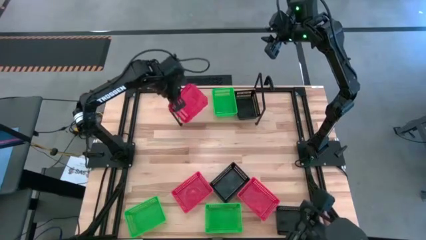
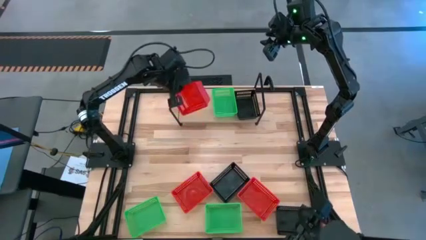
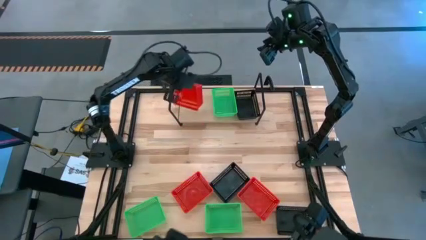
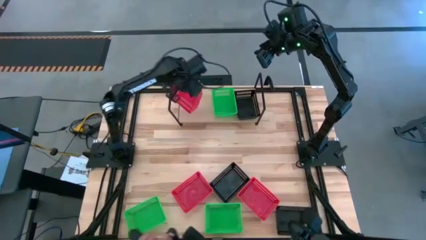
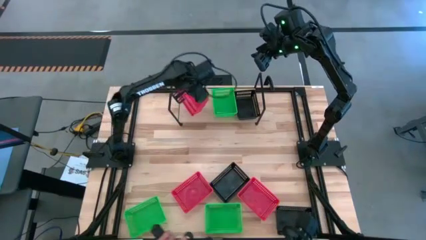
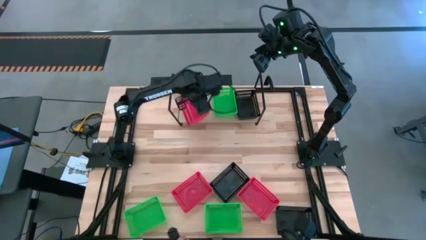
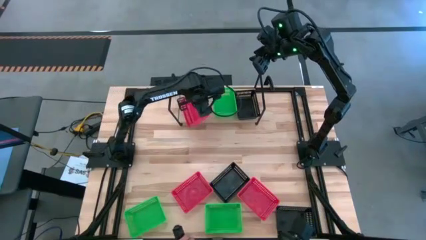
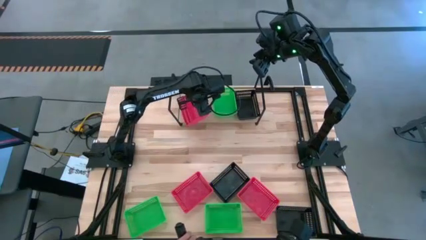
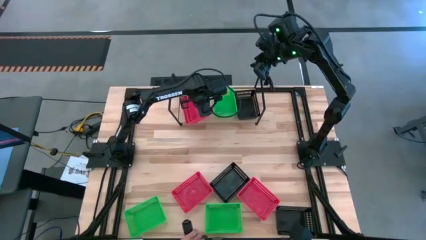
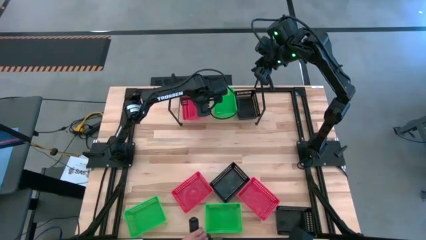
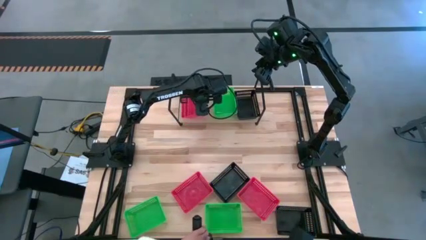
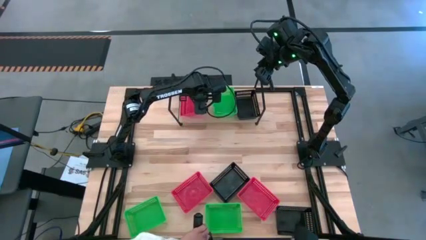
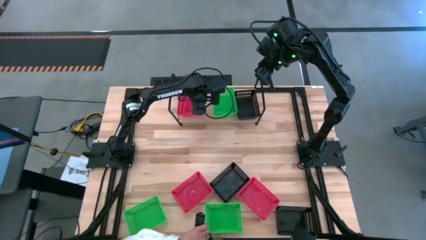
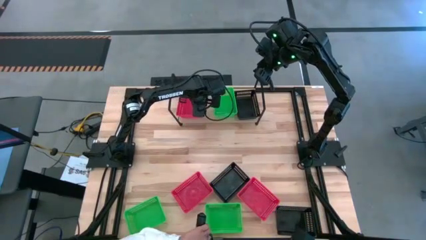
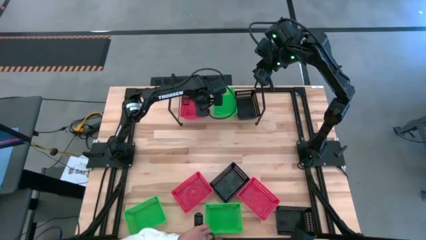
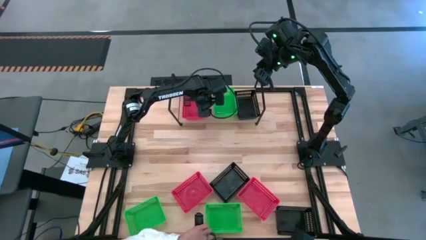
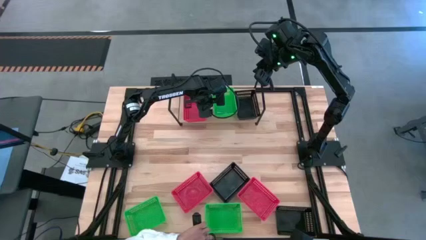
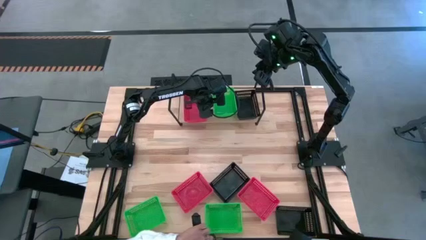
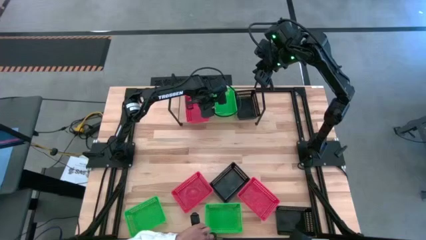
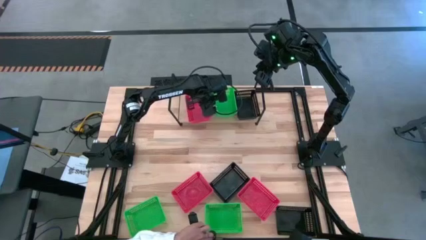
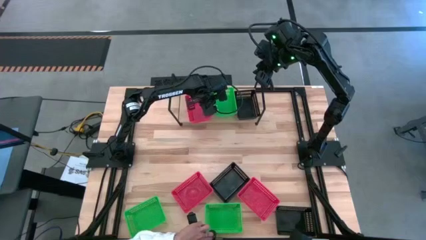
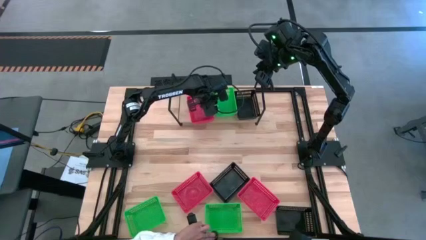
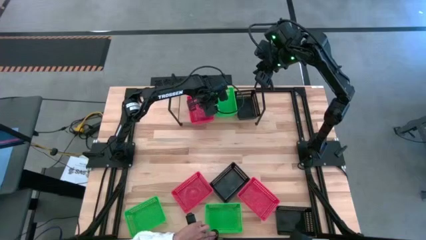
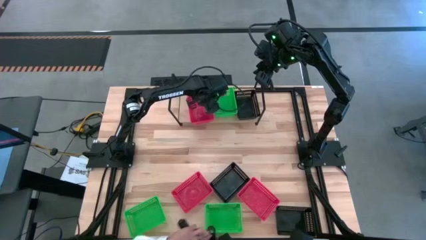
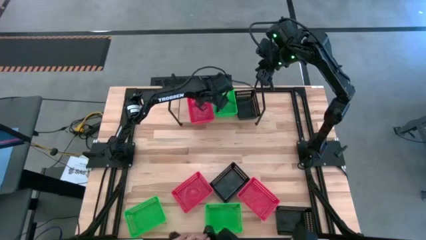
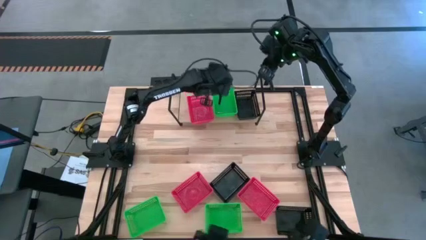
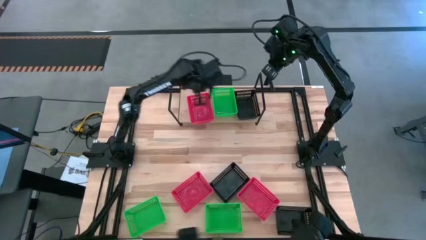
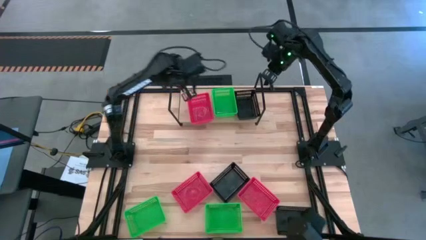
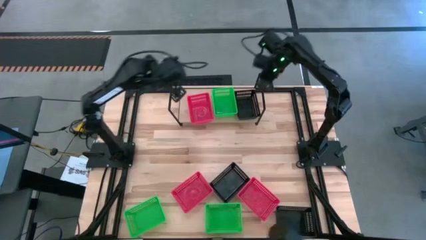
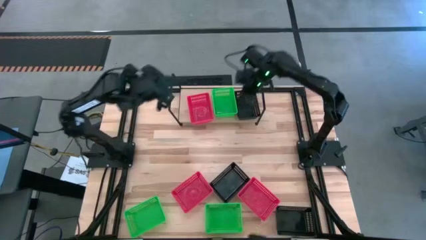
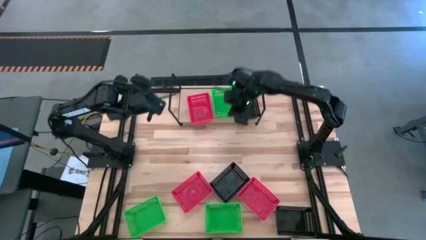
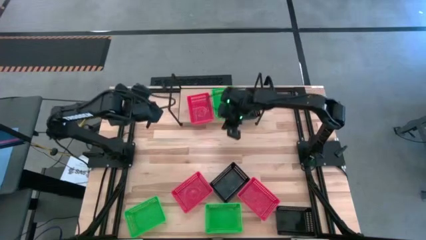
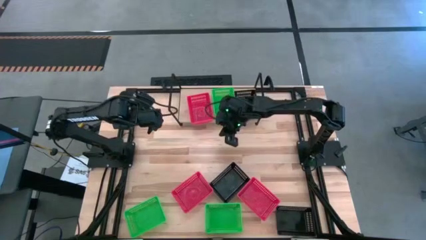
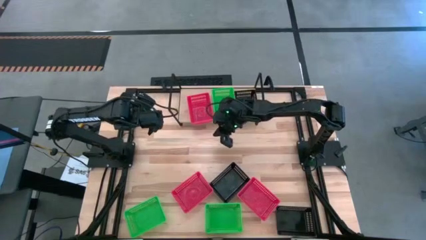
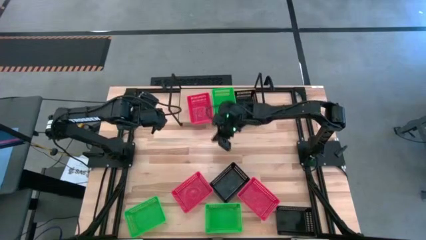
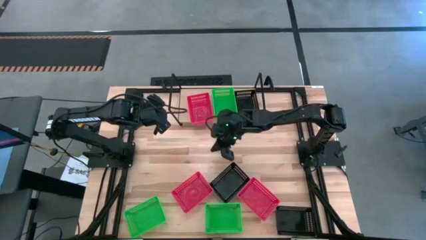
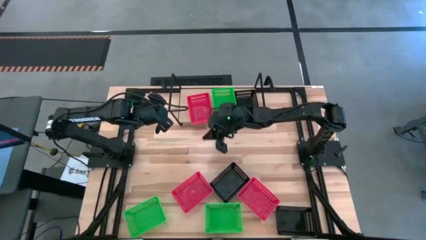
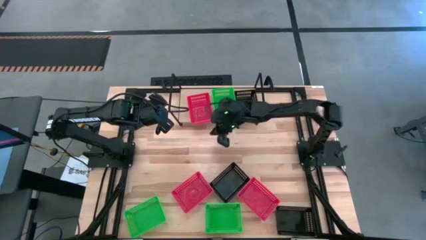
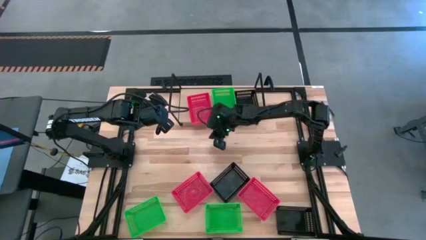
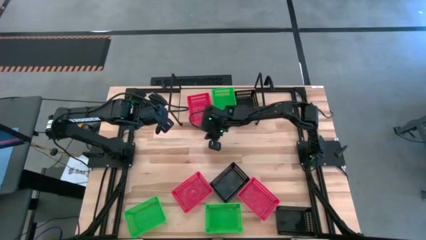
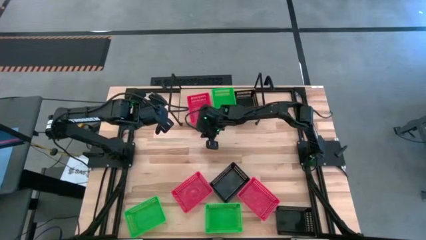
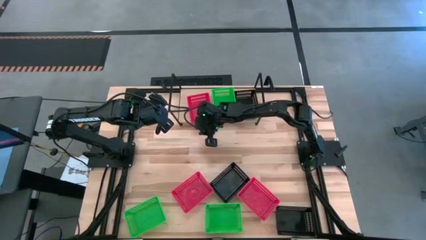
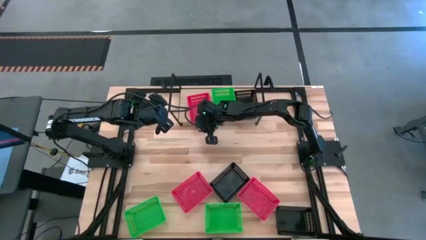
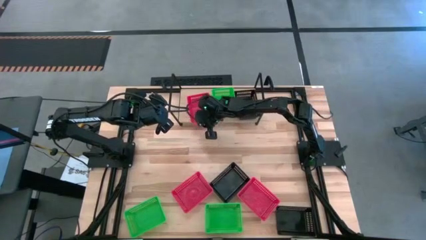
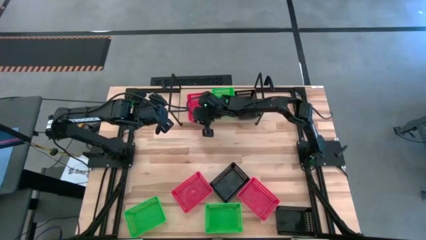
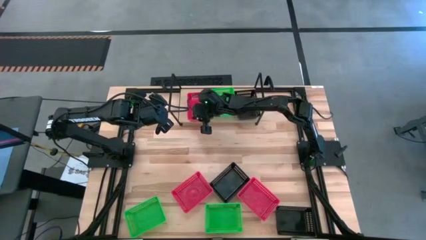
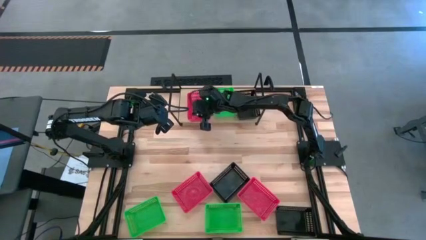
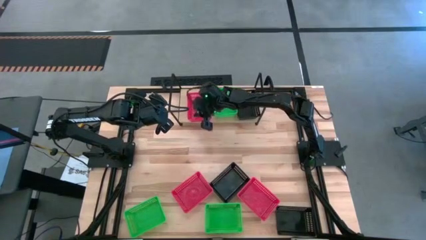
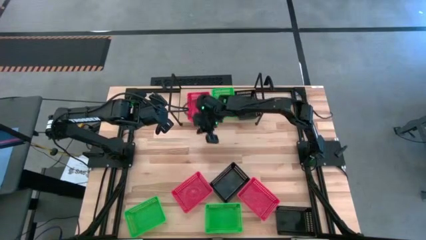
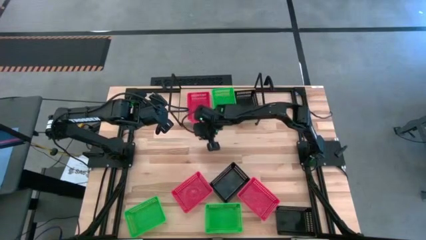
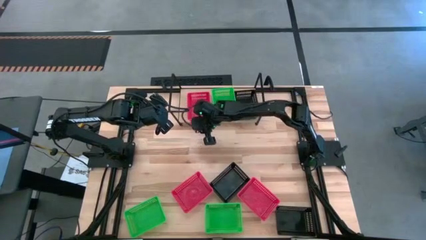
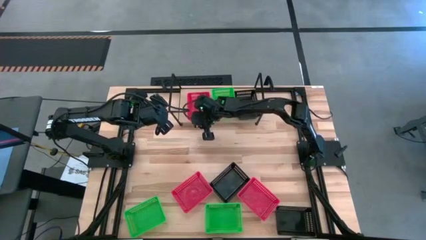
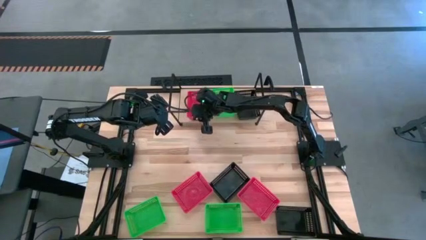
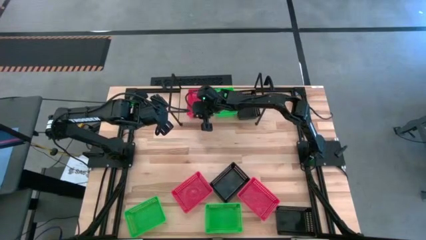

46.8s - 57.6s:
Task: Stack baskets on shelf by color
Put the top red bin on the shelf

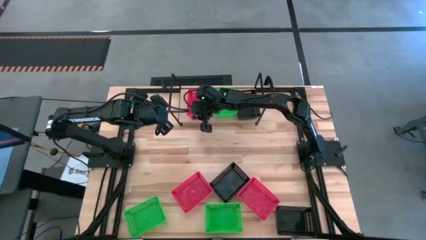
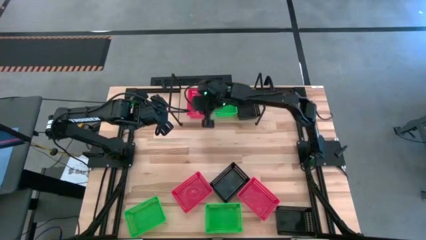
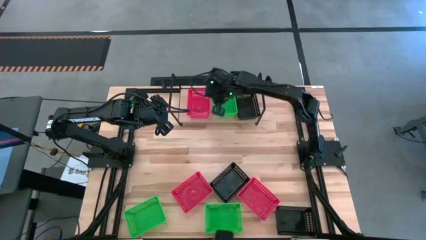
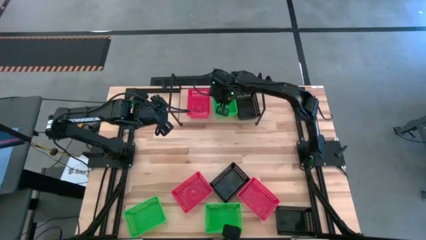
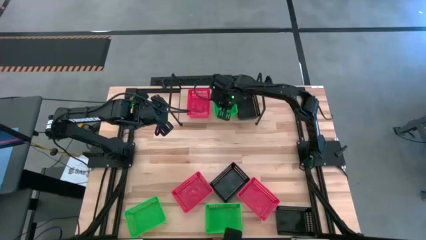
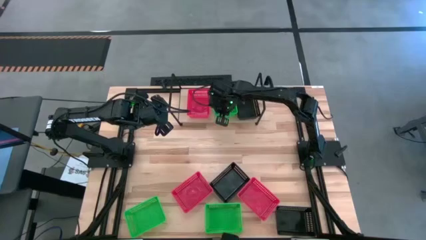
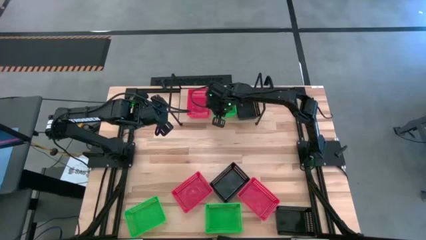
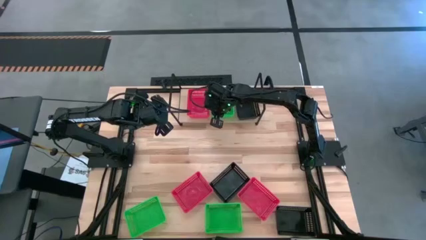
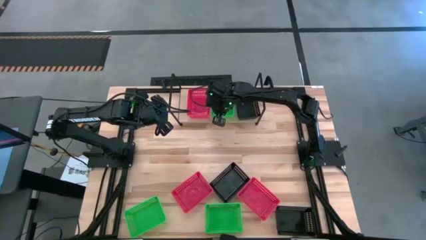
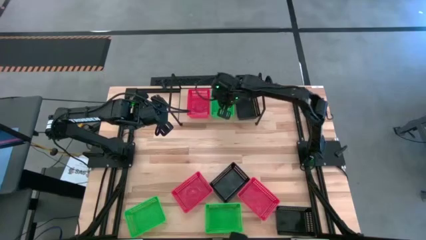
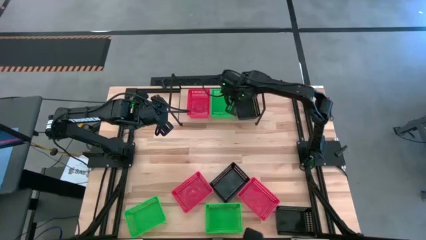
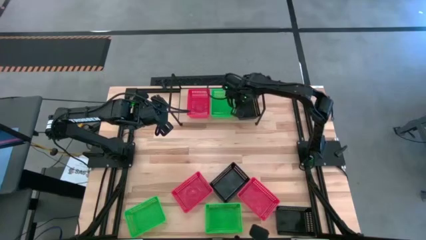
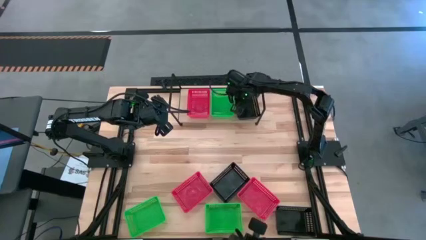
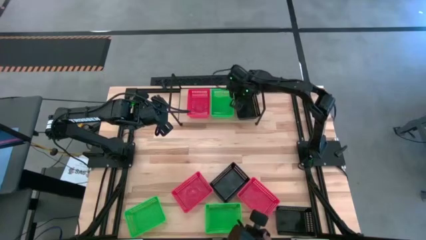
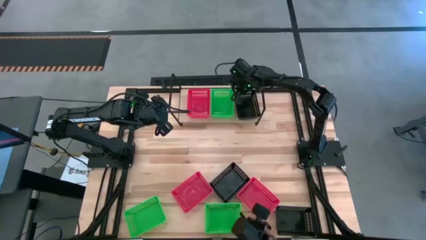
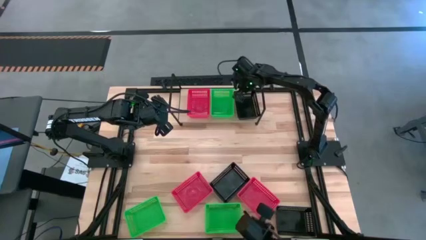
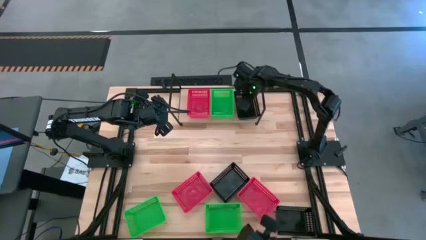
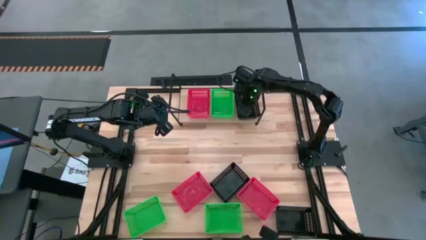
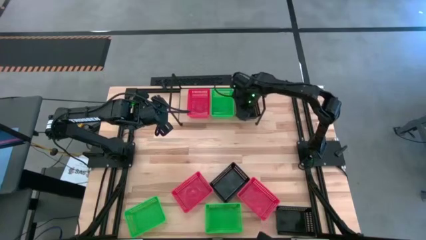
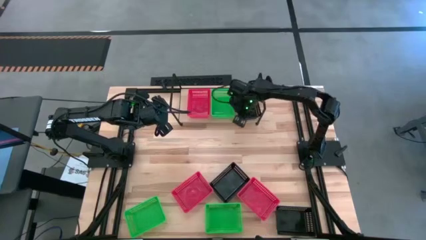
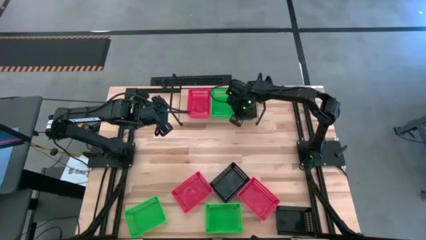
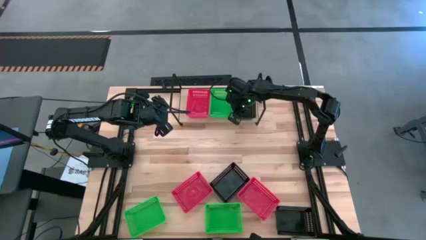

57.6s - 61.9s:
Adjust the bins on the shelf
